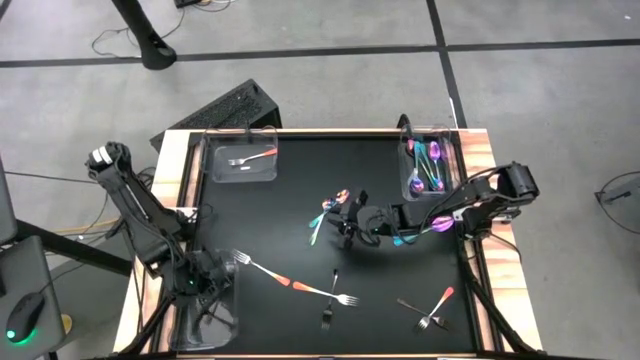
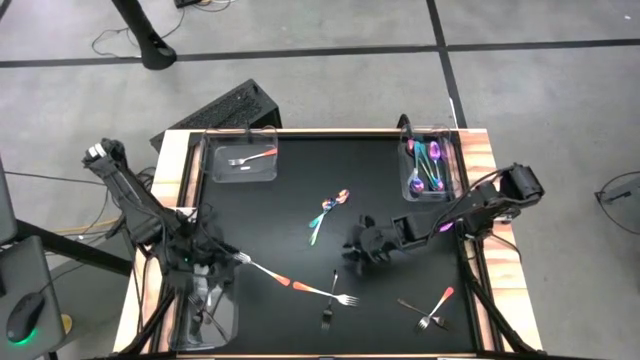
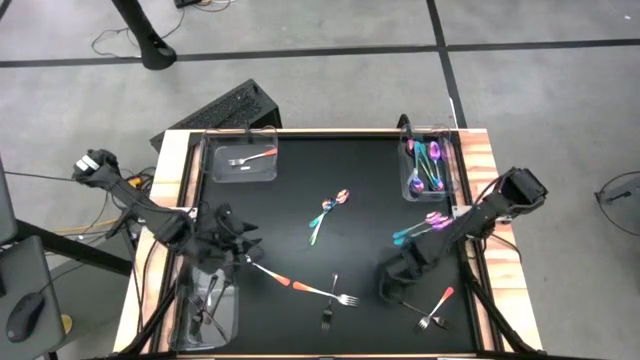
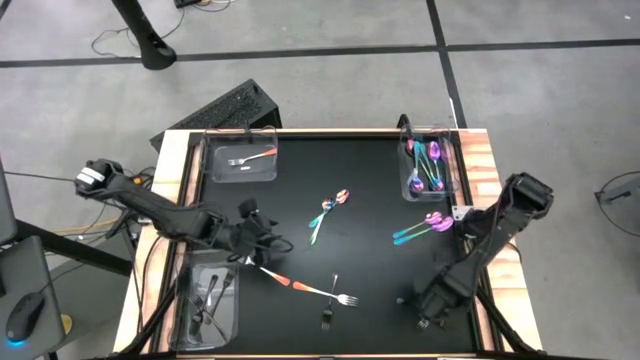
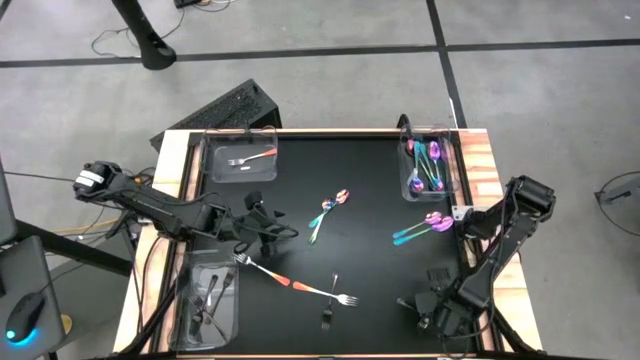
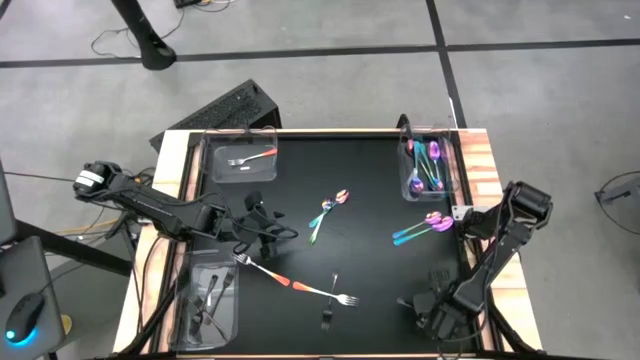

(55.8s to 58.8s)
Task: Sort silverware by color (type)
Put the orange fork into the top left transparent bin

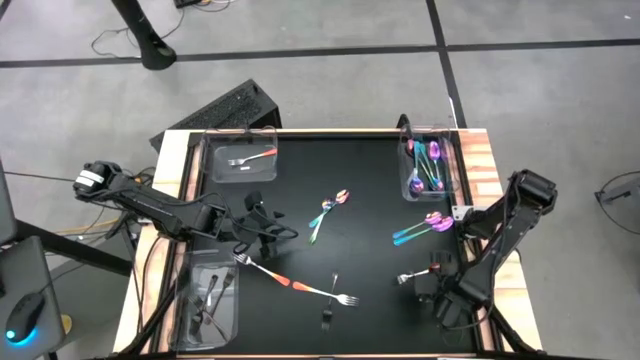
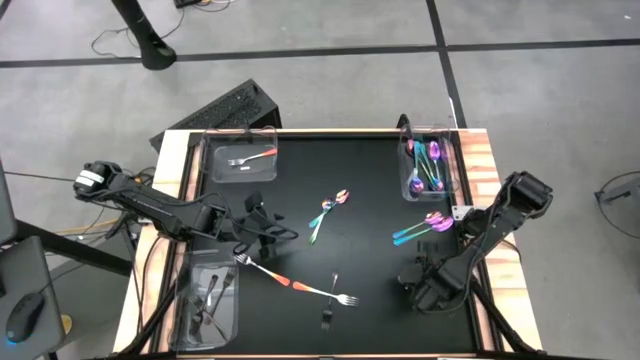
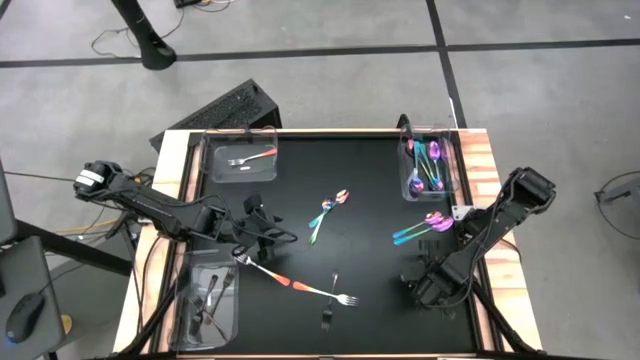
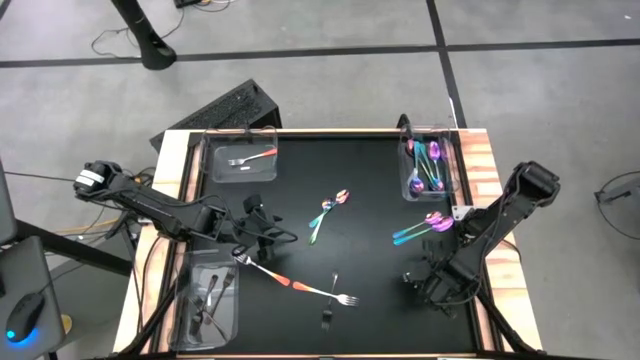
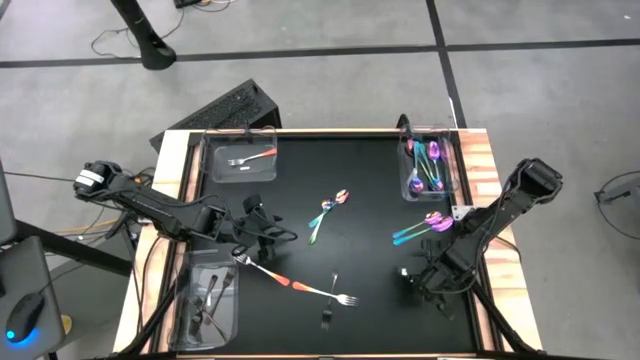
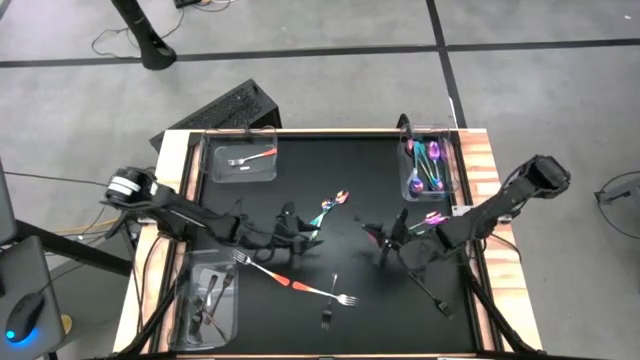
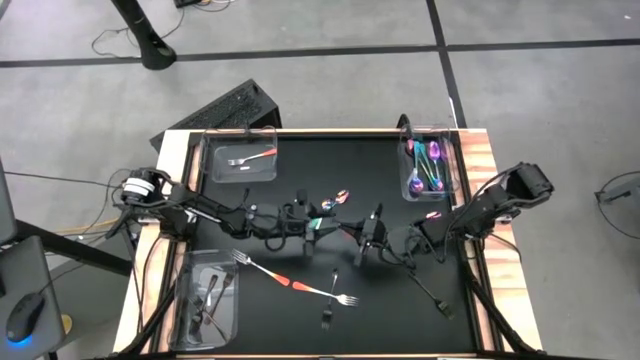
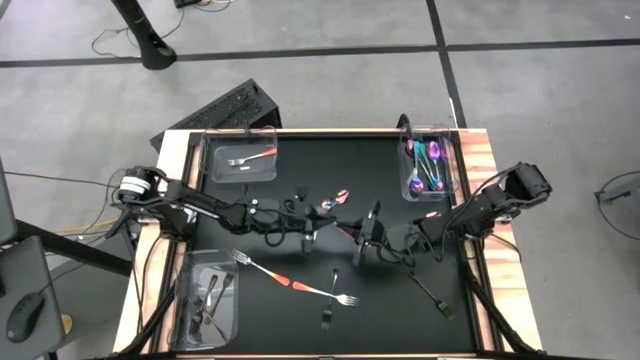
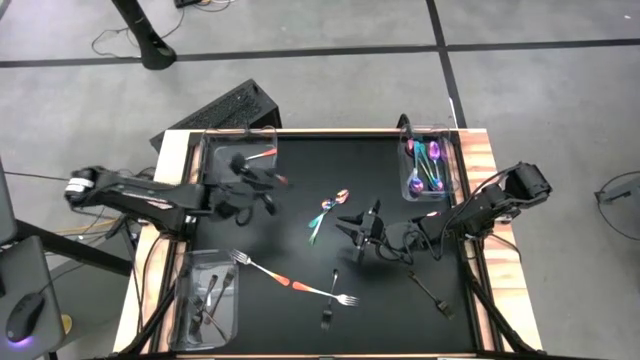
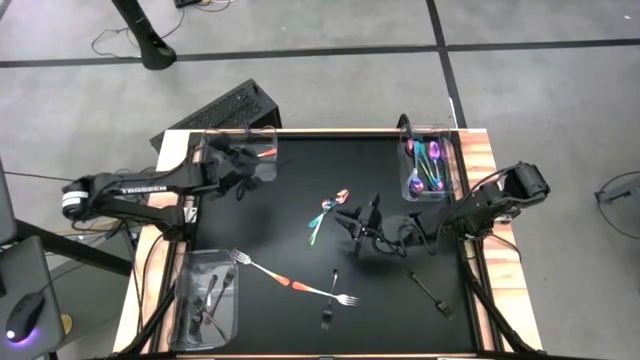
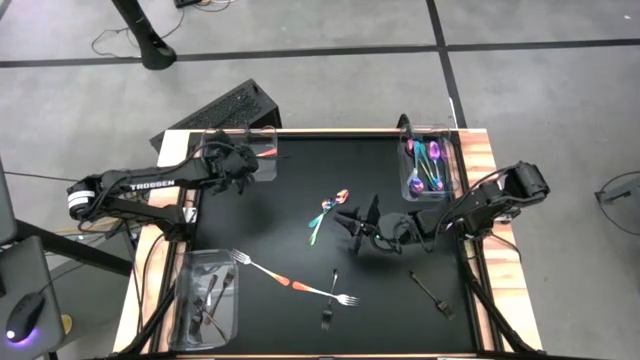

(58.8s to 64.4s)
Put the orange fork into the top left transparent bin

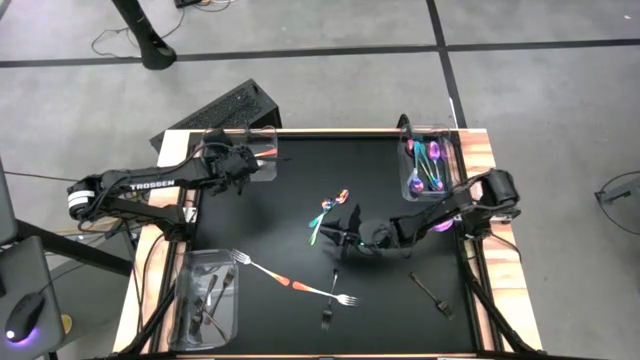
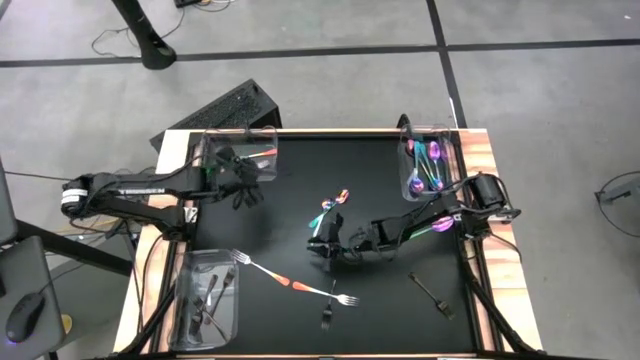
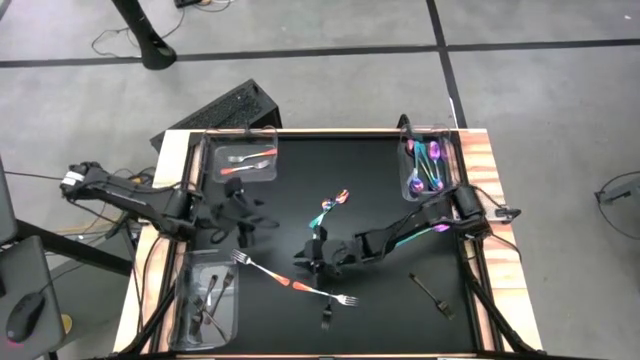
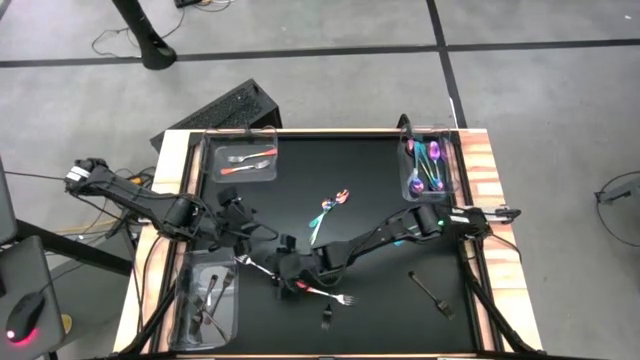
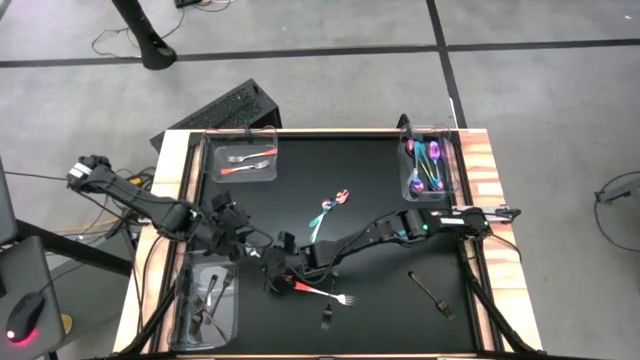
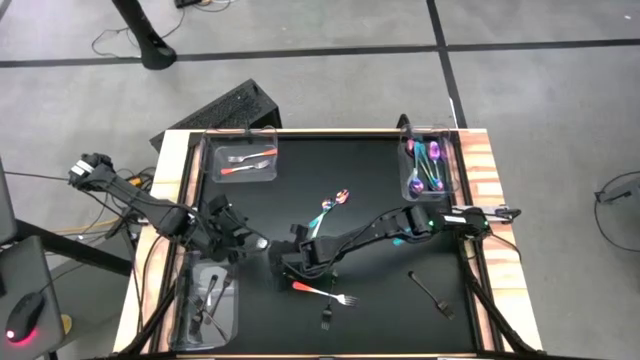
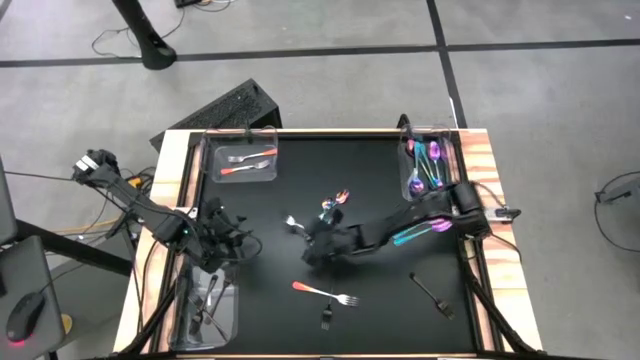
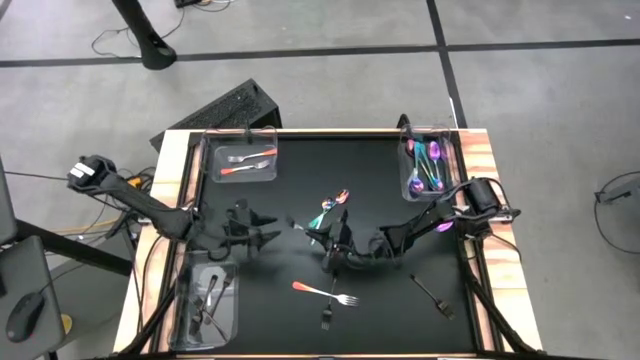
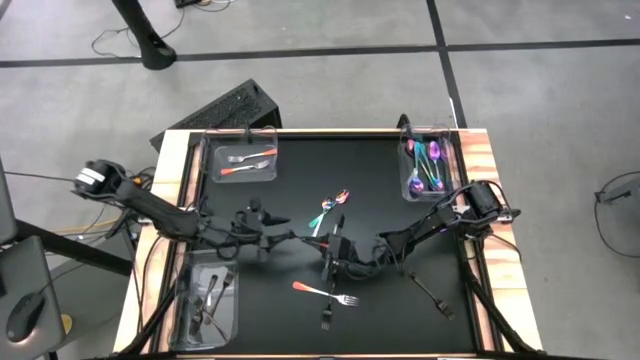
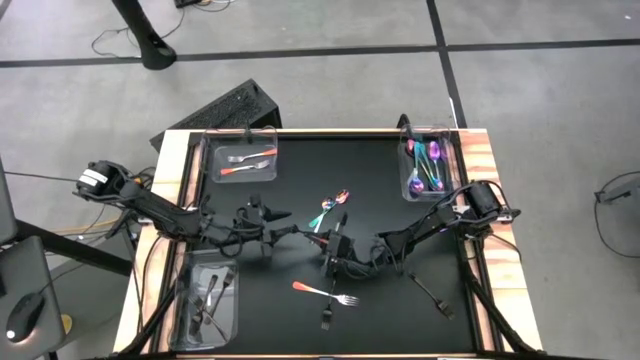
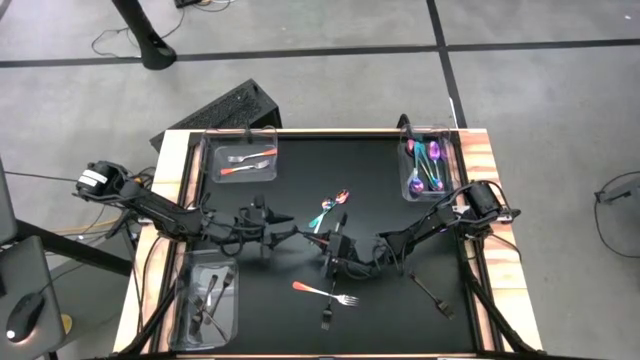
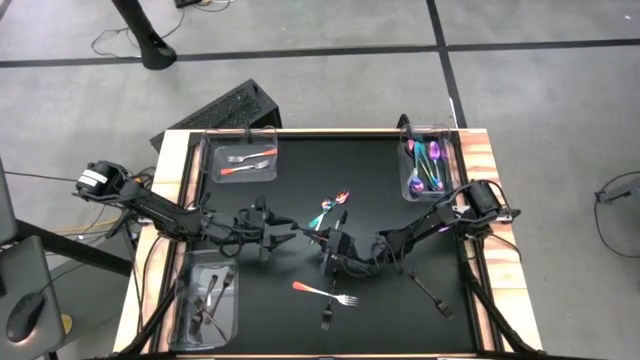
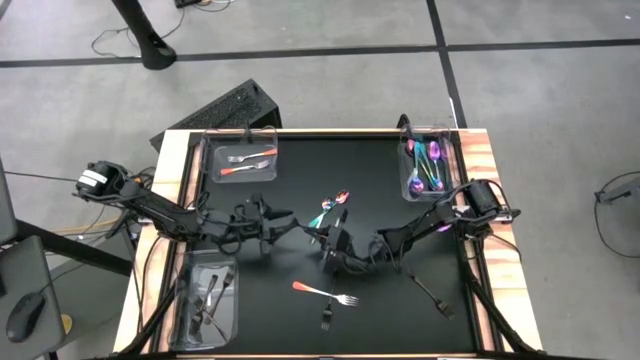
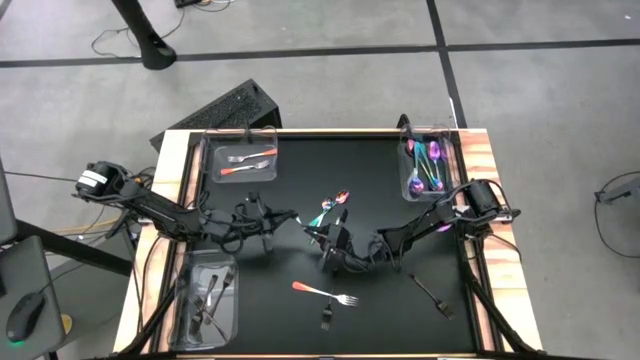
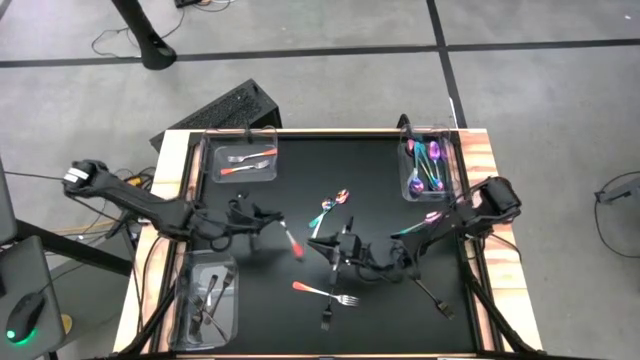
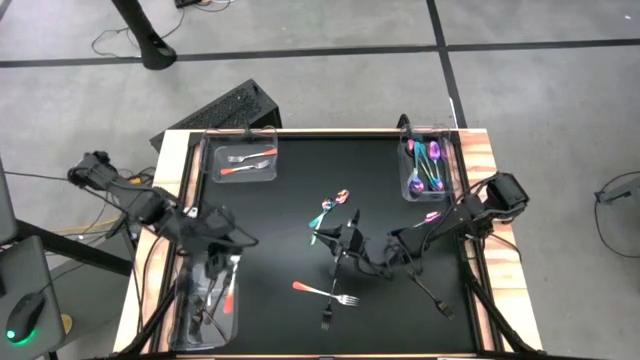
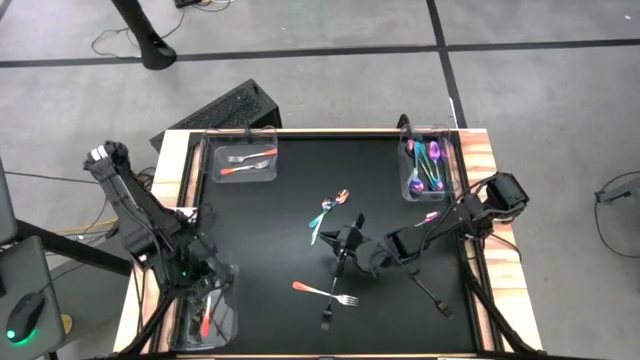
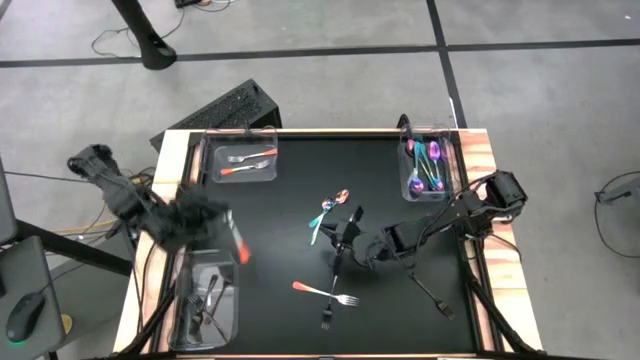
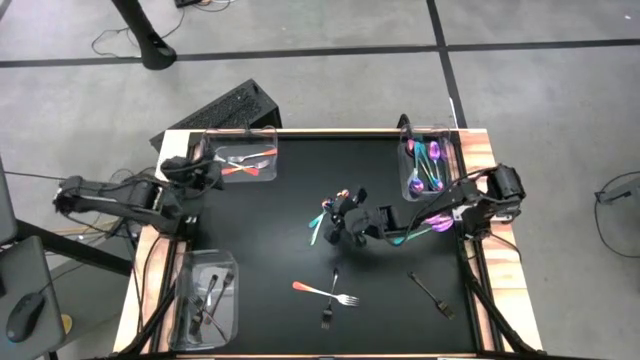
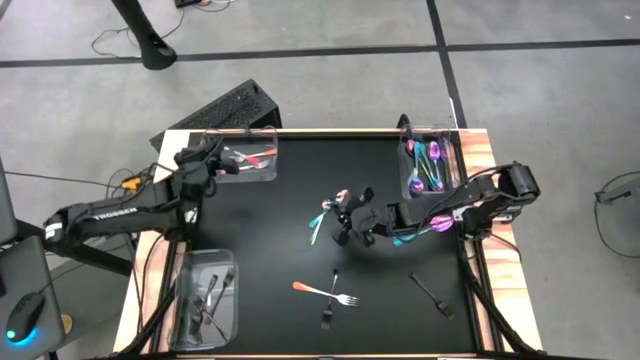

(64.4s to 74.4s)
Put the orange fork into the top left transparent bin

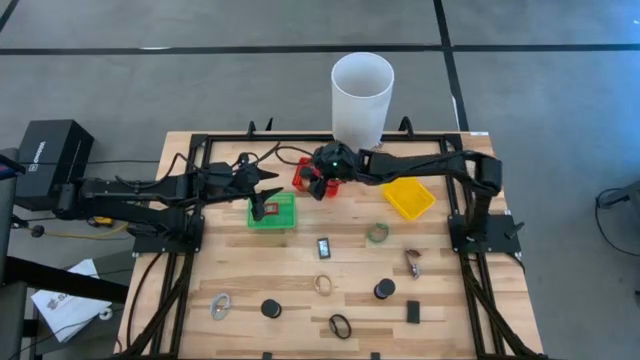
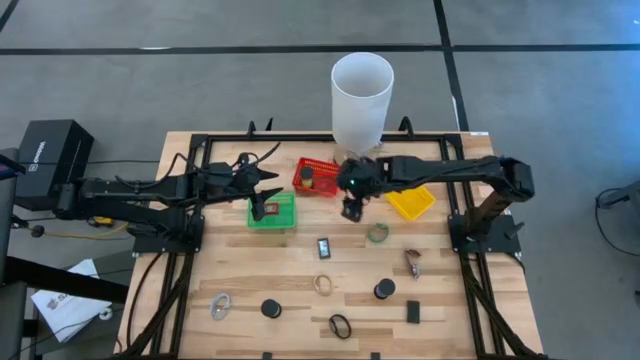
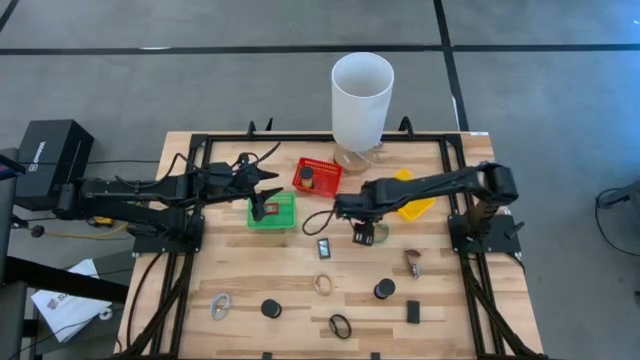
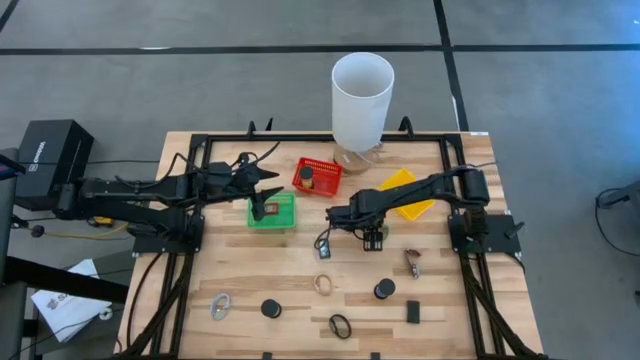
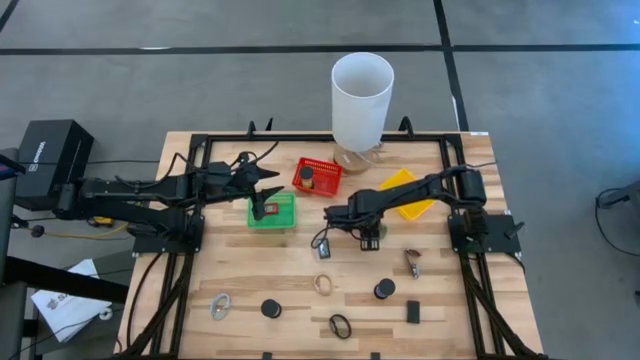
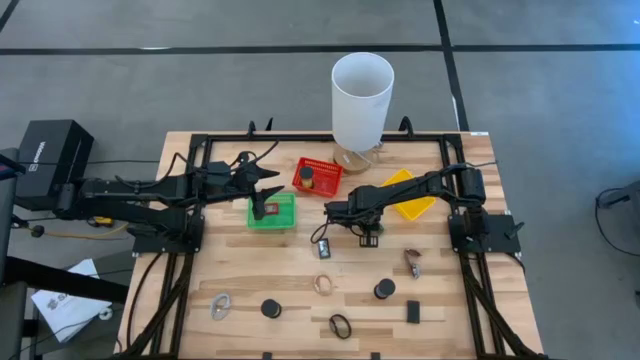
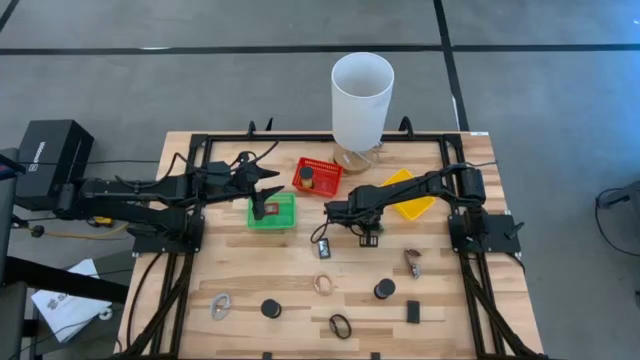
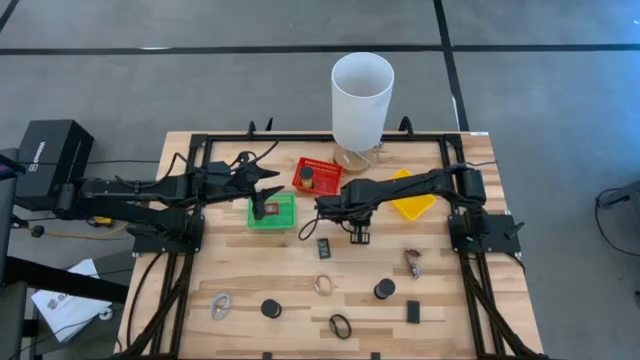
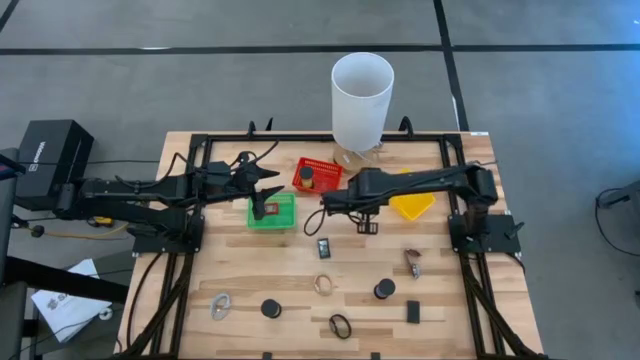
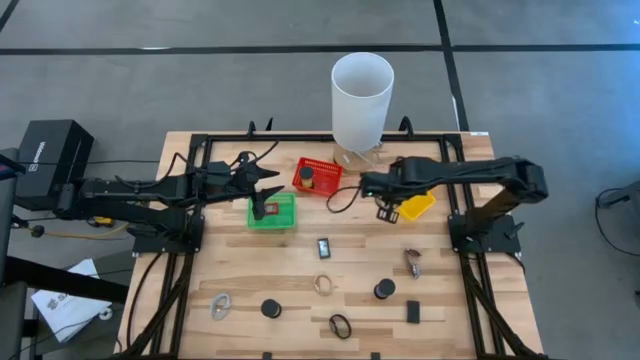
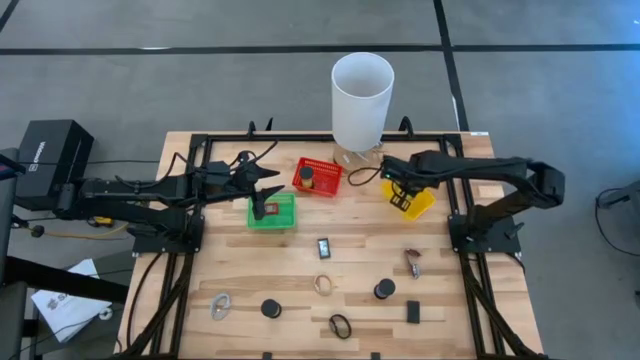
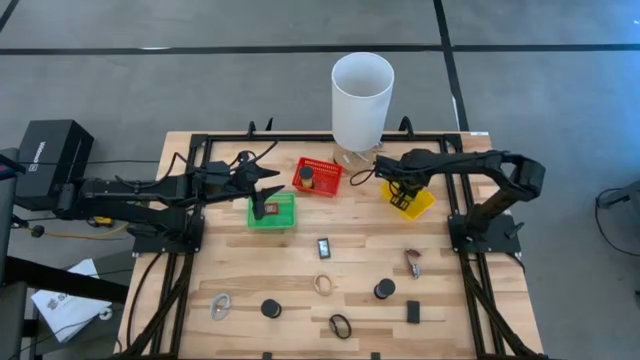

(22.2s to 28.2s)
Task: Pick & Place Office items
Put the green watch into the yellow bin
